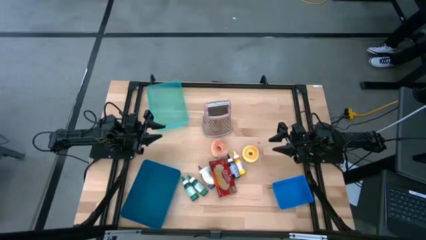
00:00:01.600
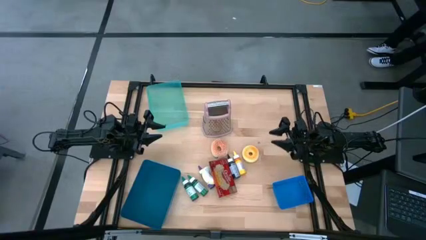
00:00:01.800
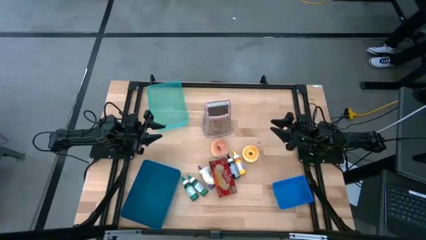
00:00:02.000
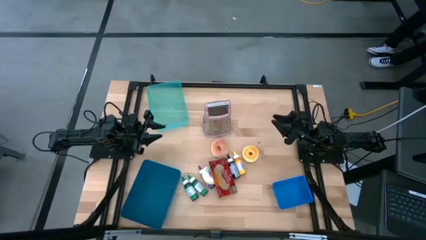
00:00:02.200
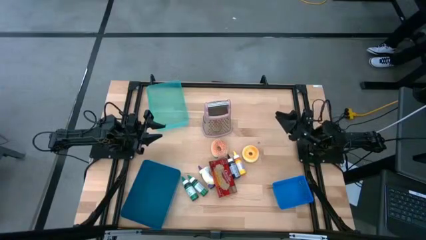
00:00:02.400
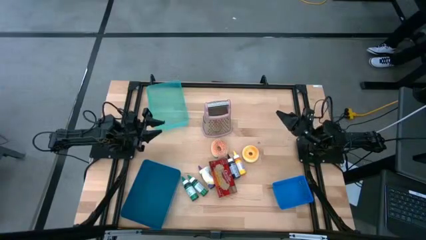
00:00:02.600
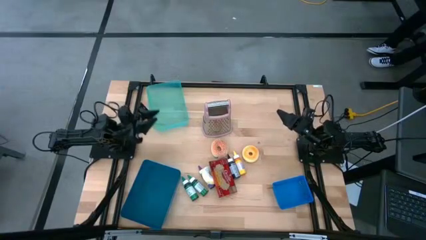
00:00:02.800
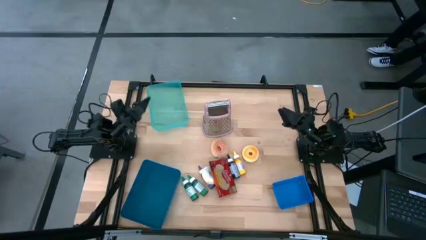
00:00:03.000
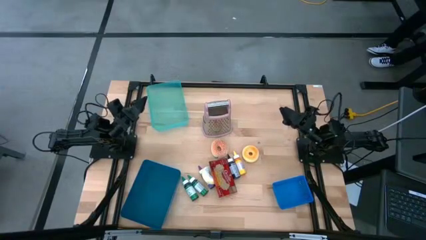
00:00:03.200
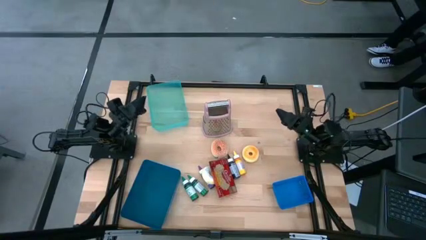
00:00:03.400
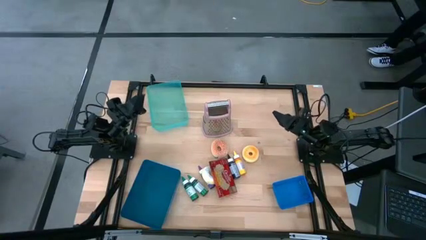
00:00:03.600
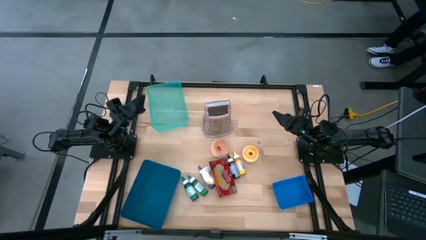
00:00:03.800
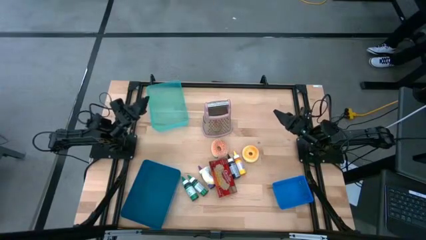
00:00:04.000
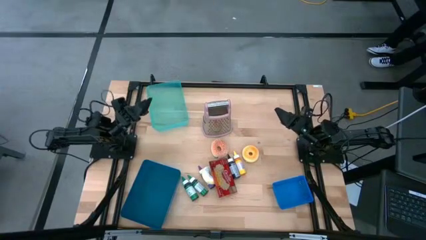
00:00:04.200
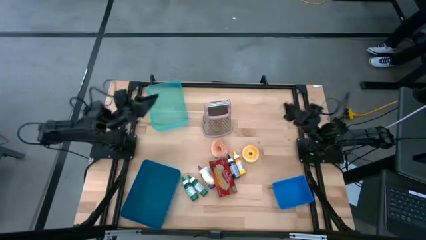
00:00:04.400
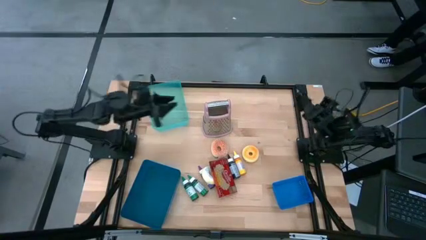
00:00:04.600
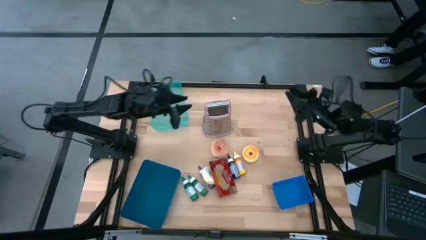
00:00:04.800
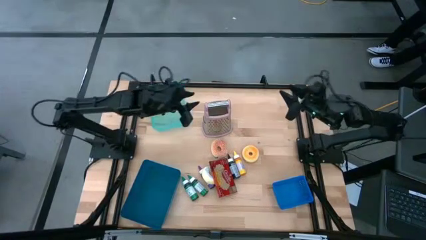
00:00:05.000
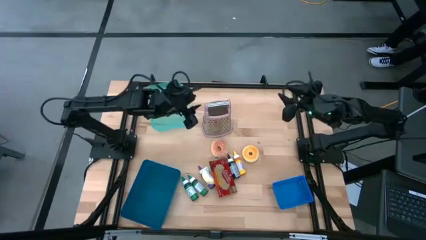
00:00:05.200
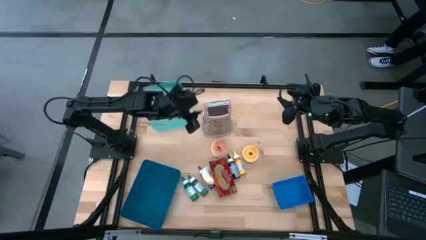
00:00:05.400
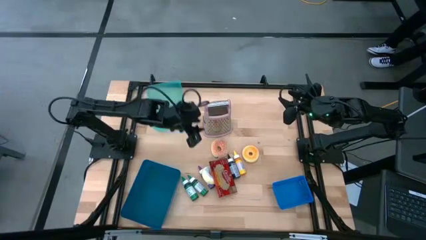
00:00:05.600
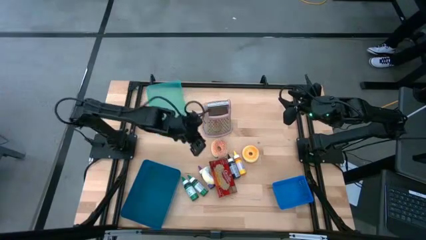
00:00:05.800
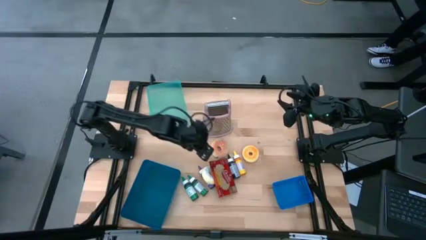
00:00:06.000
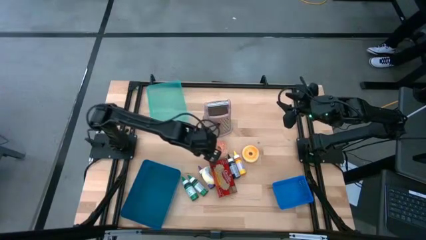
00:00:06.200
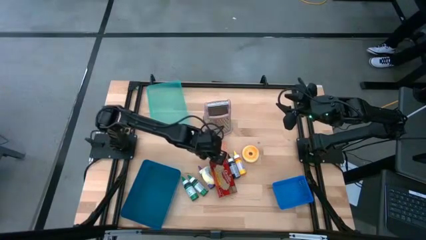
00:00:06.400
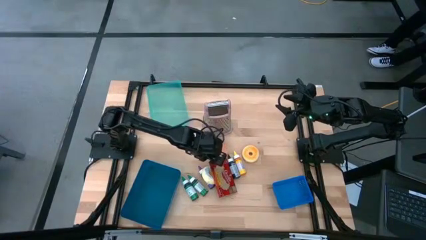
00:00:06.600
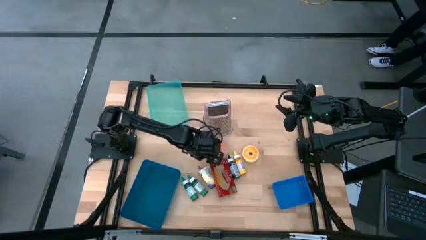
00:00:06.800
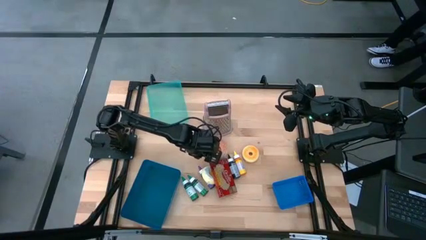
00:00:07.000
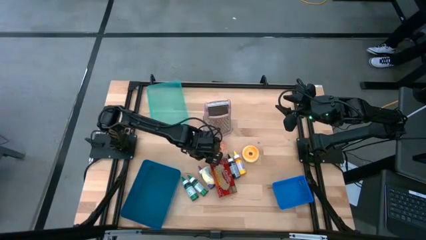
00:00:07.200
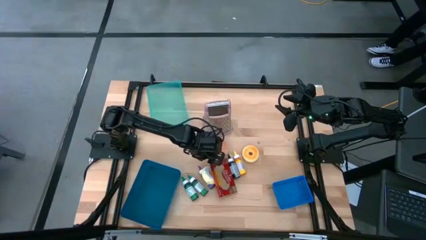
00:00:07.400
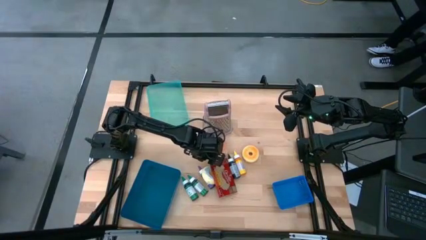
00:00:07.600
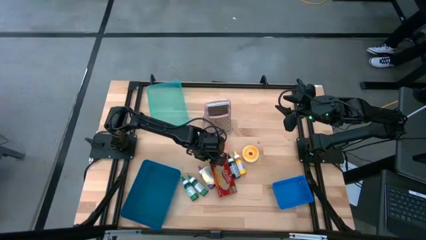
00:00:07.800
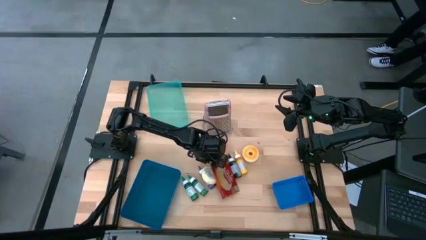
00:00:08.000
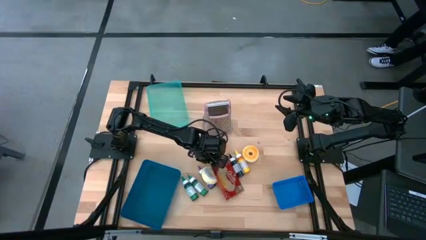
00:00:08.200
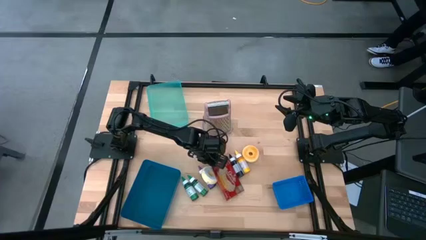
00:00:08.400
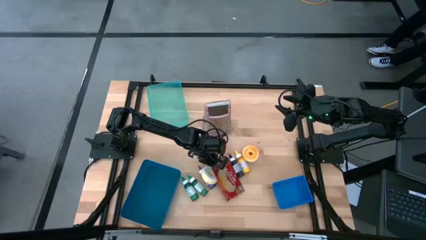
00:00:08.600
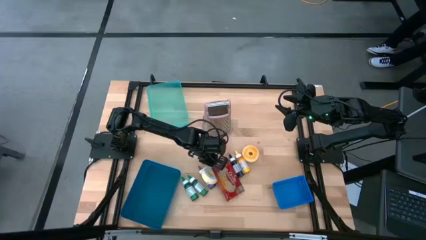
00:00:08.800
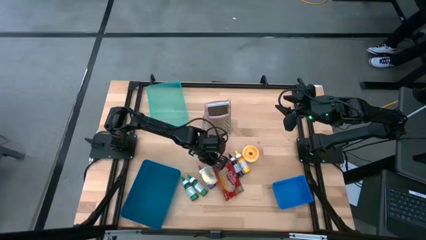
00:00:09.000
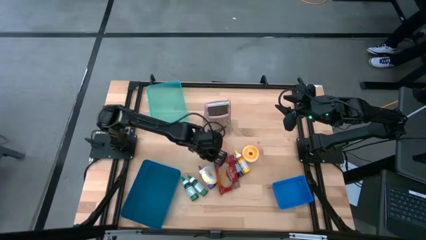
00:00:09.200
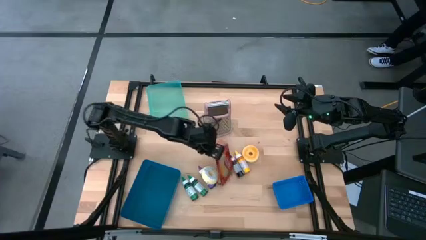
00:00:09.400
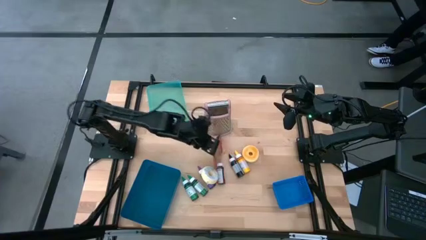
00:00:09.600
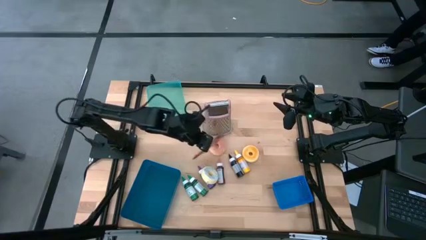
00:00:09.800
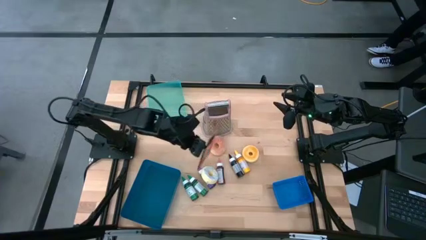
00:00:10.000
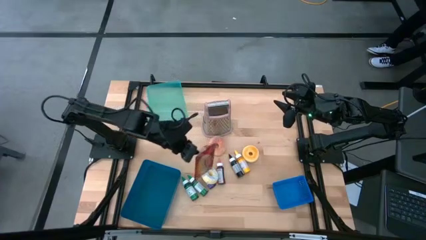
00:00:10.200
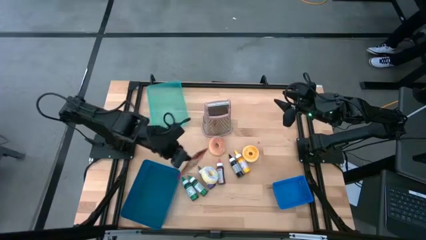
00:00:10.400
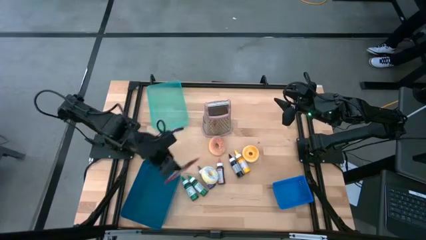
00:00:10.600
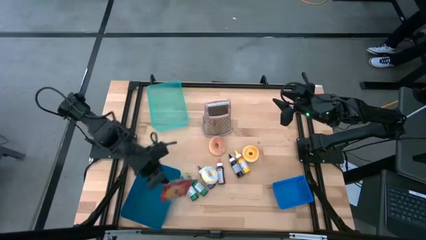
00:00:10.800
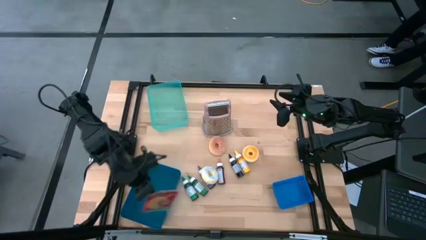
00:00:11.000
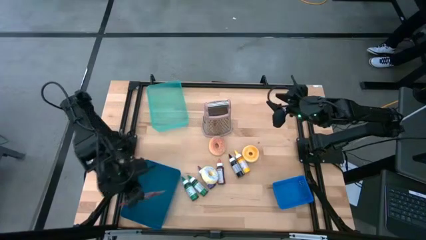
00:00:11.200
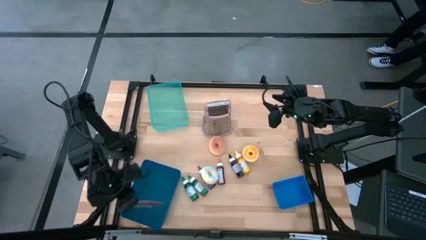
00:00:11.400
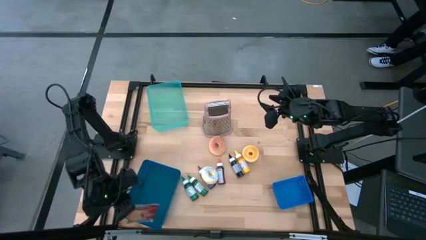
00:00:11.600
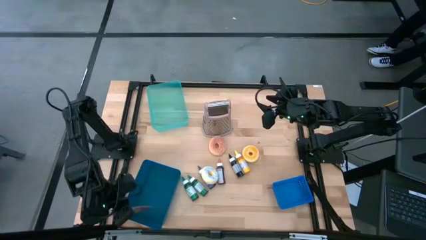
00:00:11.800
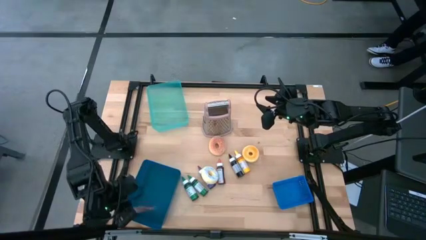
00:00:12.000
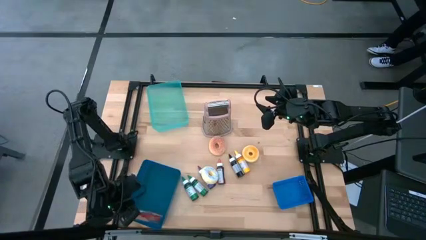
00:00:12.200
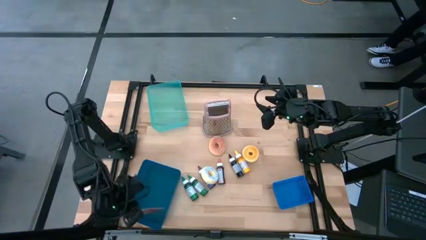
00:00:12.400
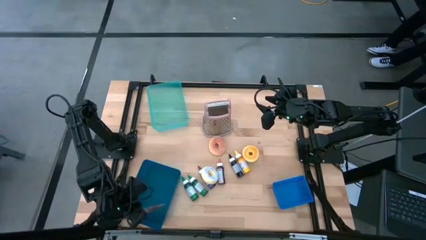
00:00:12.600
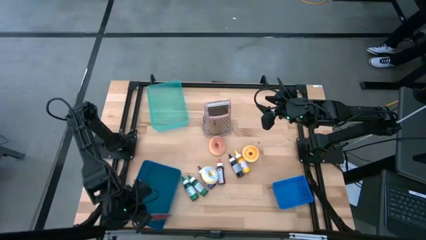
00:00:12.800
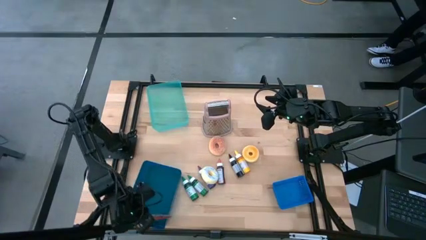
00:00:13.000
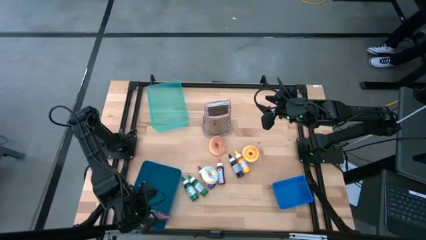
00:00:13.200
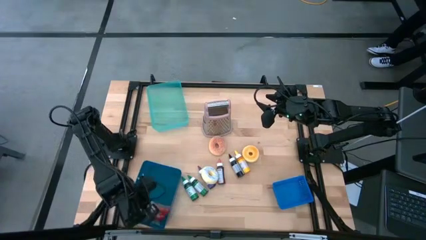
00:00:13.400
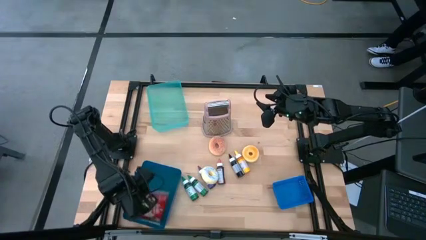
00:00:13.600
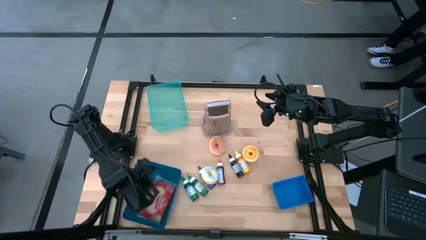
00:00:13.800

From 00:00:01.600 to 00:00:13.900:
Put the red popcorn bag into the dark blue bin
